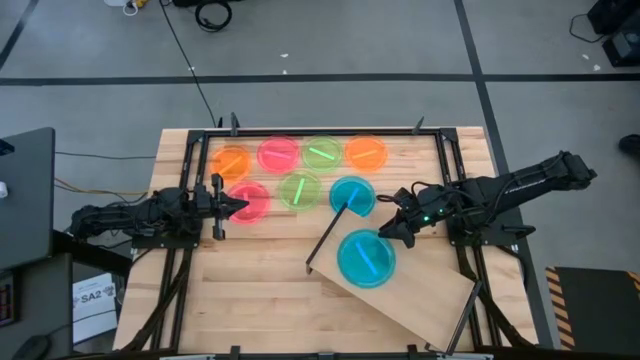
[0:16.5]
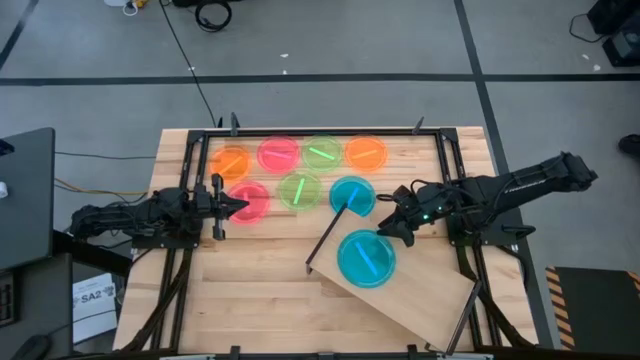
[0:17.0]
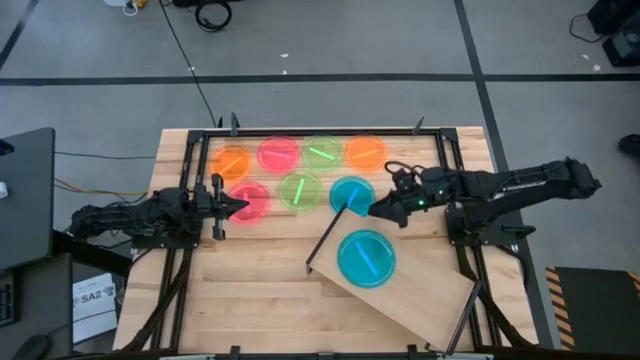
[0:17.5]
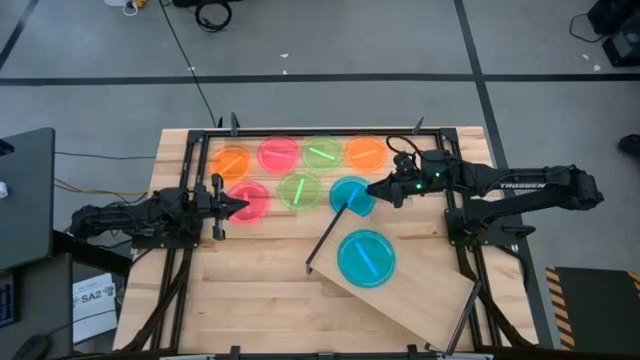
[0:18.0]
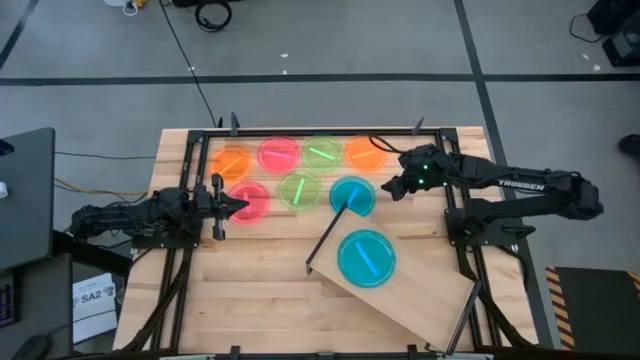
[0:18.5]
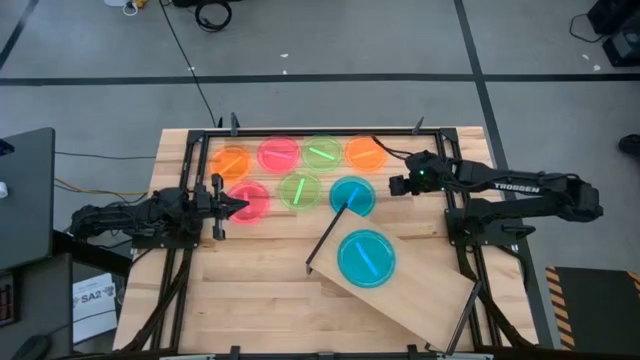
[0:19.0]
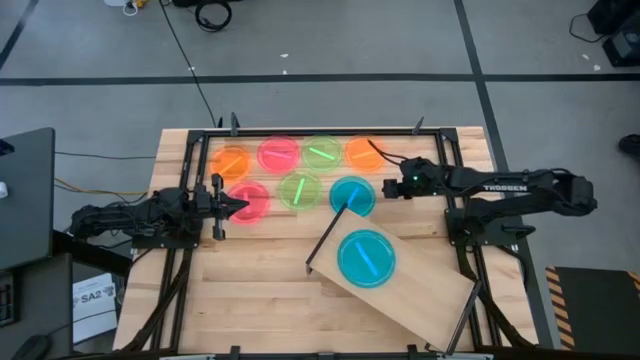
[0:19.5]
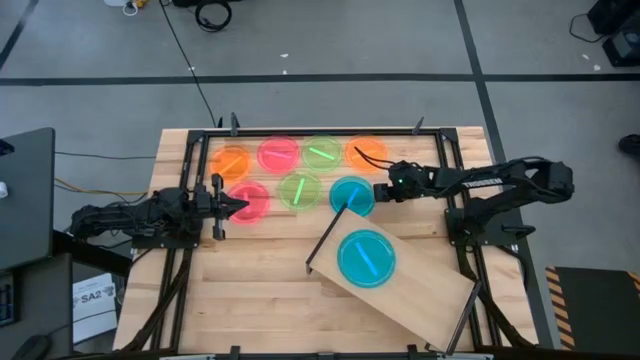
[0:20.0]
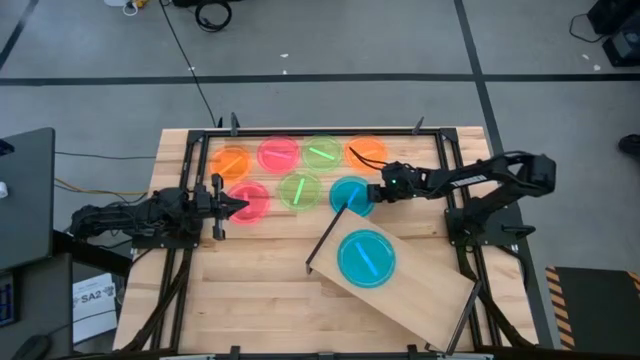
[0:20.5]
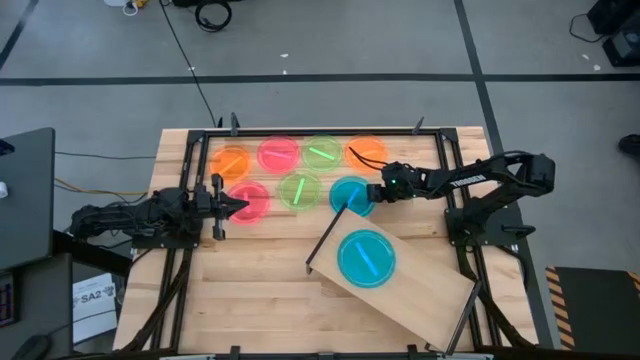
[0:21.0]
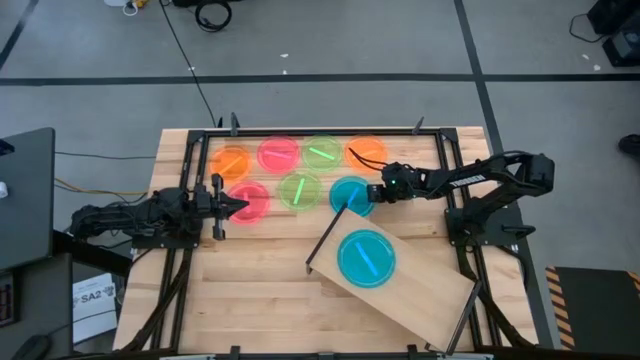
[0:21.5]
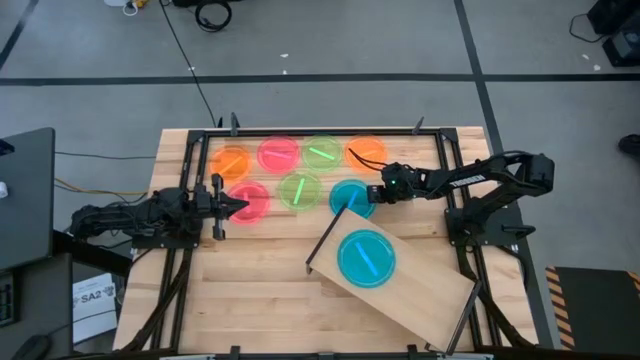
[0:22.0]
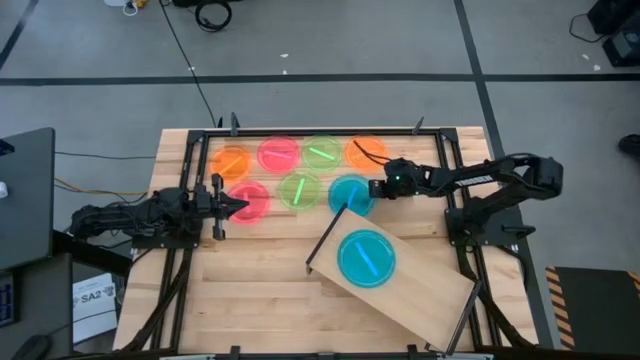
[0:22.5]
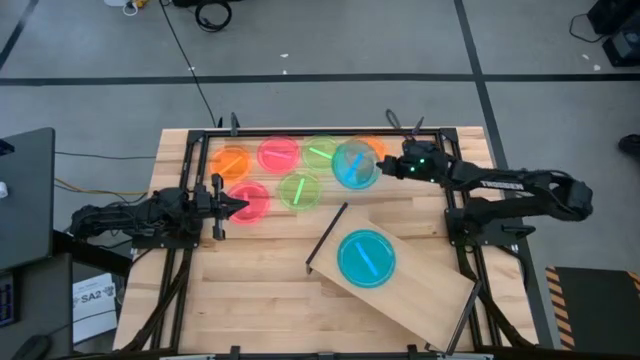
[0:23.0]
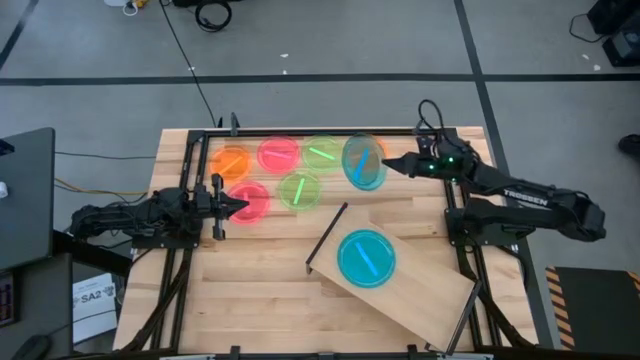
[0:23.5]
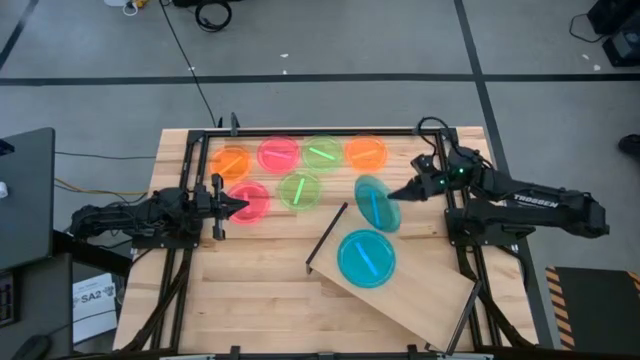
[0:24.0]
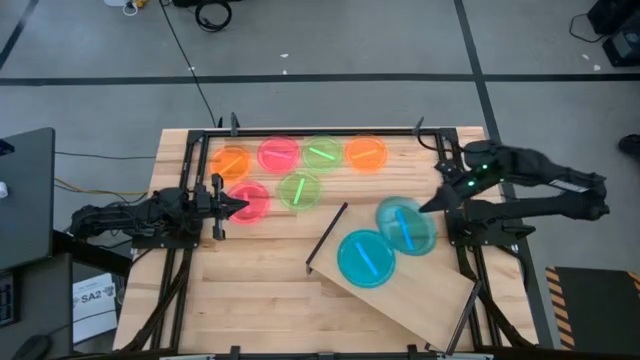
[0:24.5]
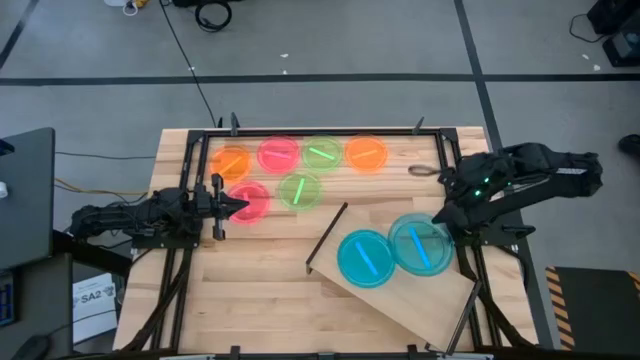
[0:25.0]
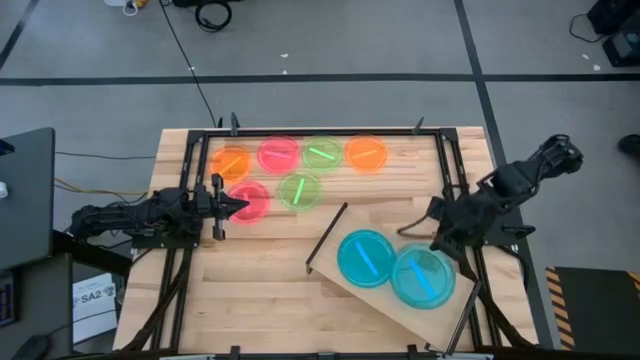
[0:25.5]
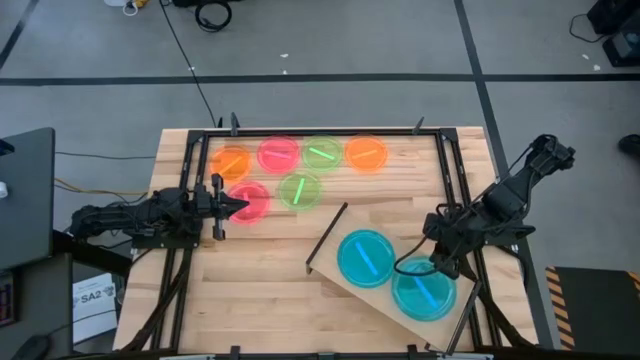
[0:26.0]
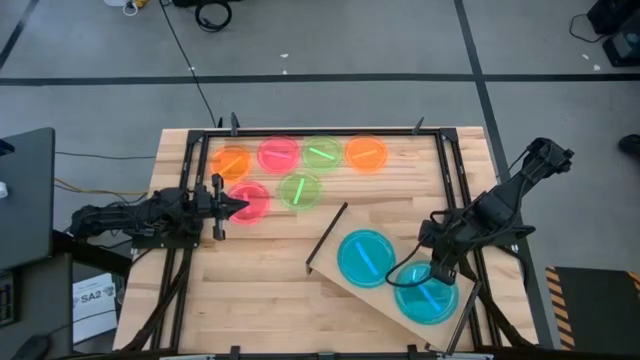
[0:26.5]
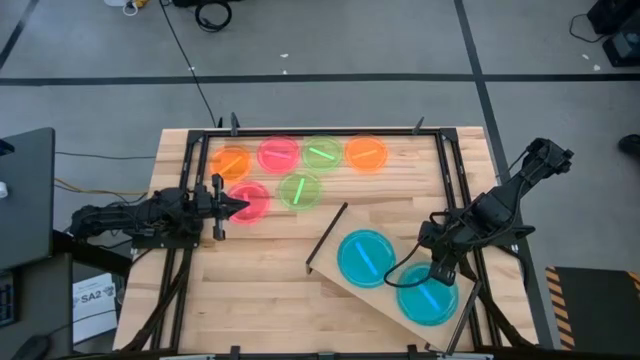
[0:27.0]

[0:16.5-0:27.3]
Task: Place and stack plates onto a shelf
Put the transparent blue plate on the shelf

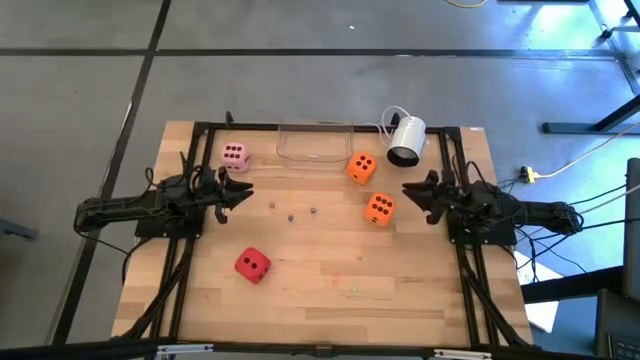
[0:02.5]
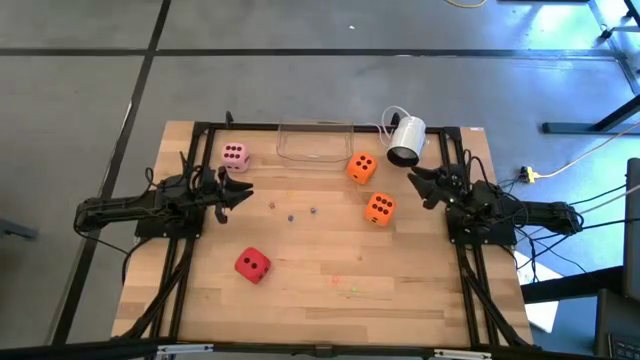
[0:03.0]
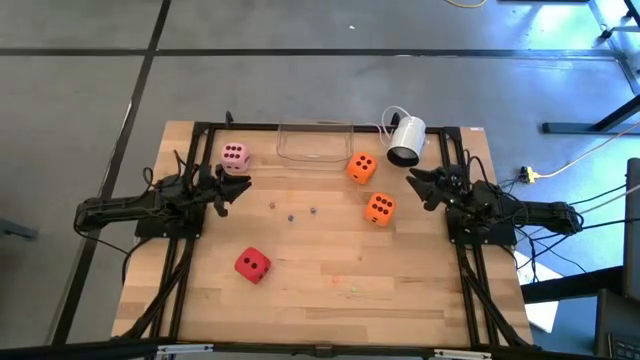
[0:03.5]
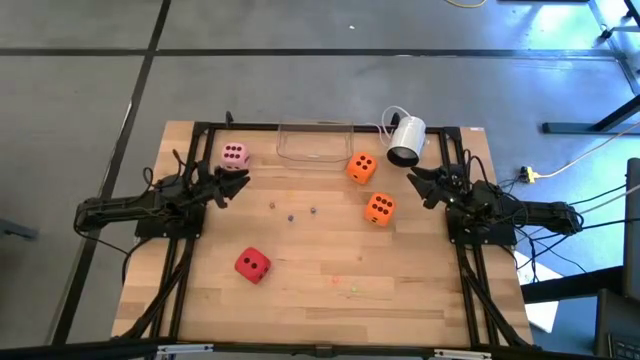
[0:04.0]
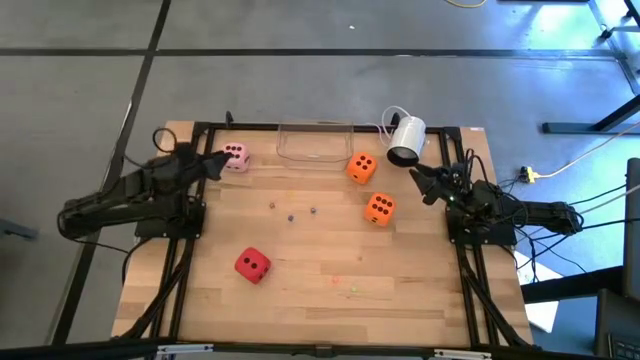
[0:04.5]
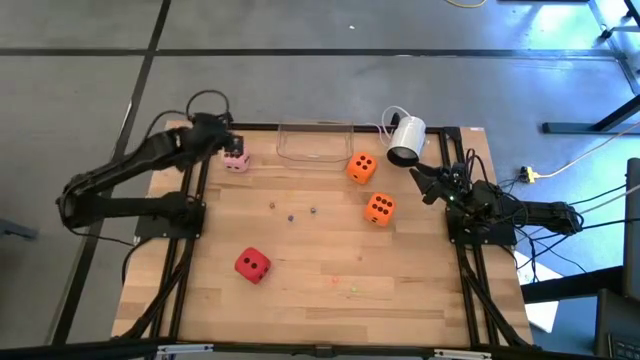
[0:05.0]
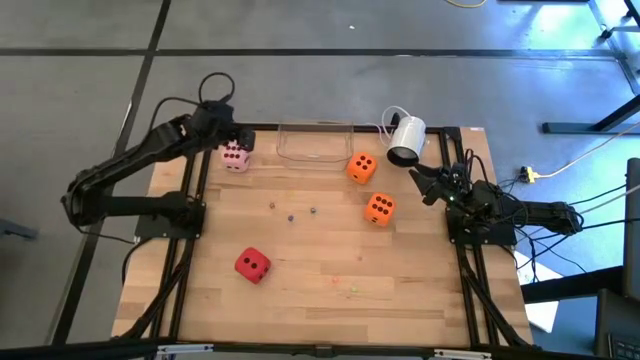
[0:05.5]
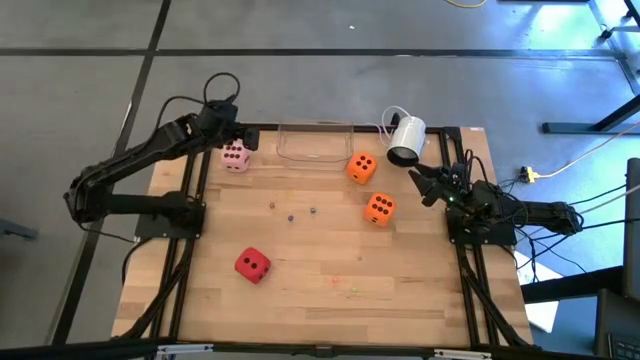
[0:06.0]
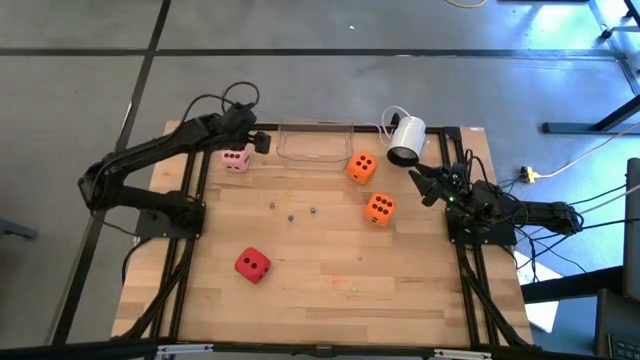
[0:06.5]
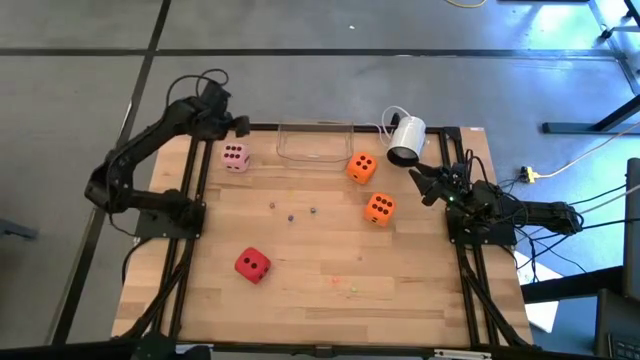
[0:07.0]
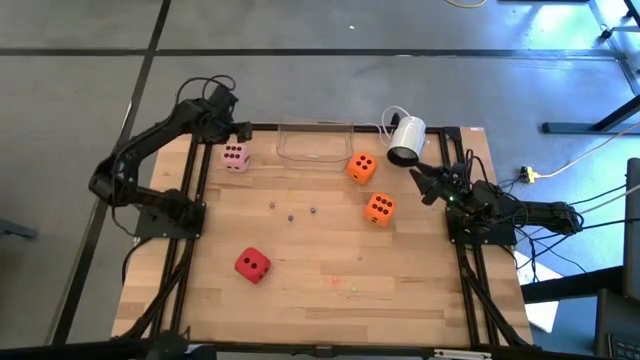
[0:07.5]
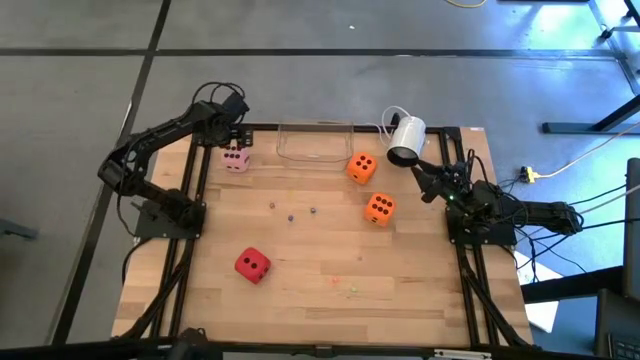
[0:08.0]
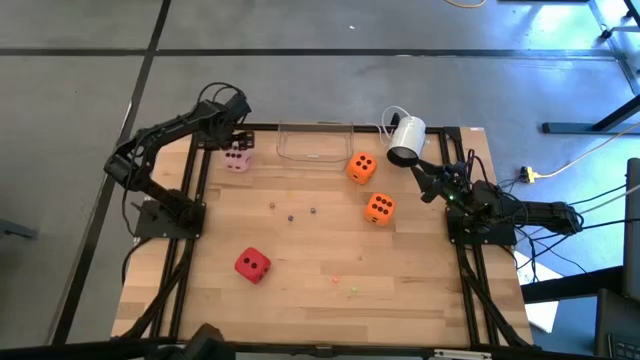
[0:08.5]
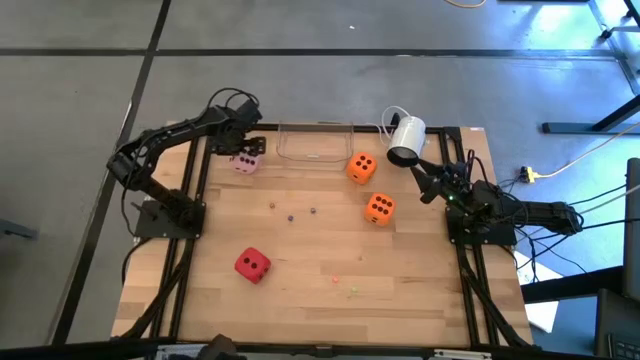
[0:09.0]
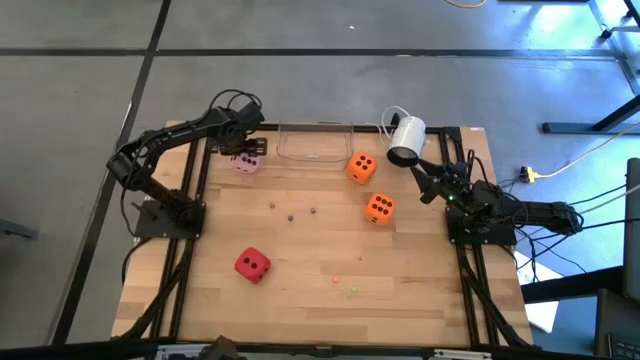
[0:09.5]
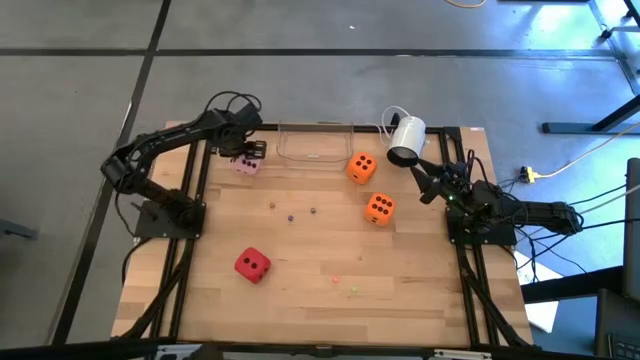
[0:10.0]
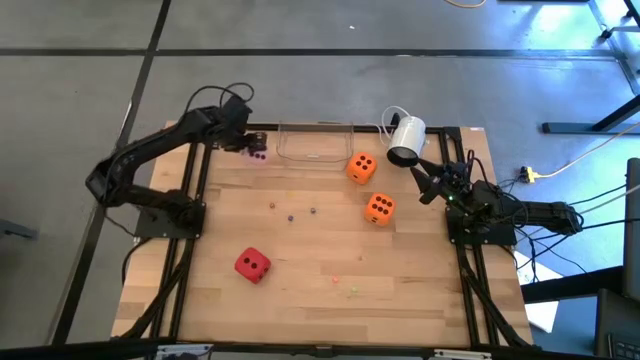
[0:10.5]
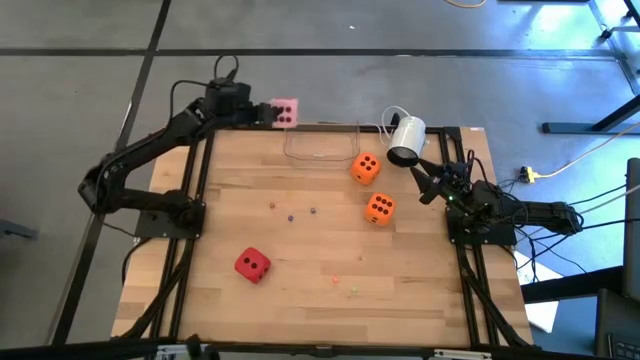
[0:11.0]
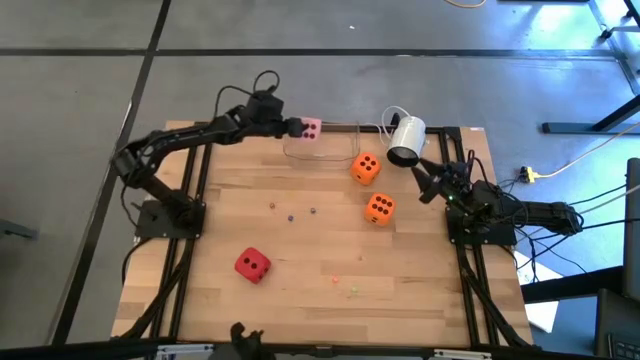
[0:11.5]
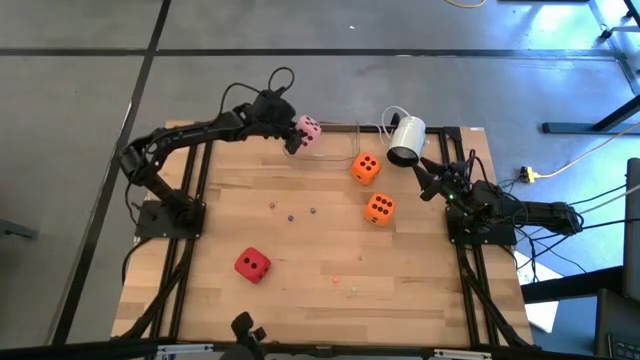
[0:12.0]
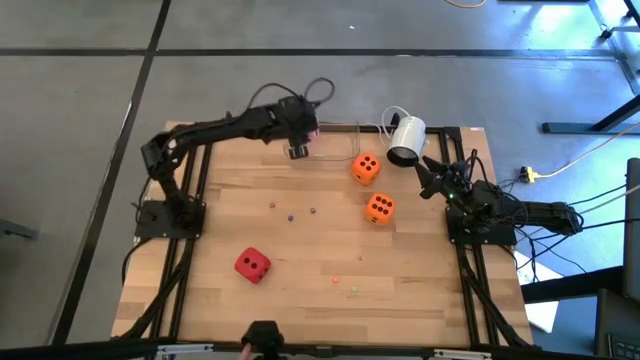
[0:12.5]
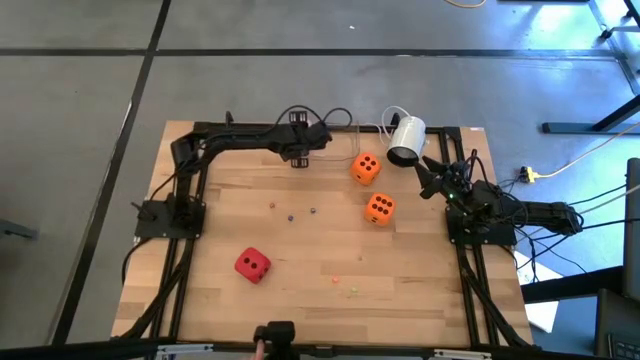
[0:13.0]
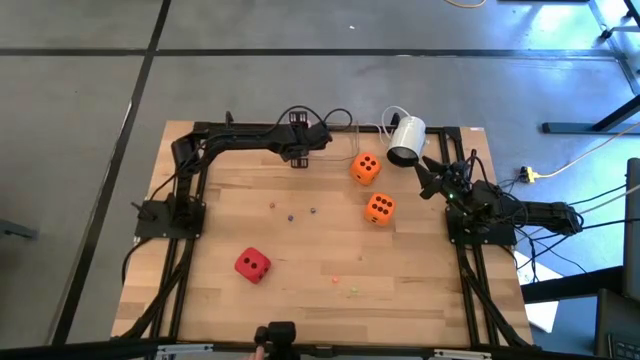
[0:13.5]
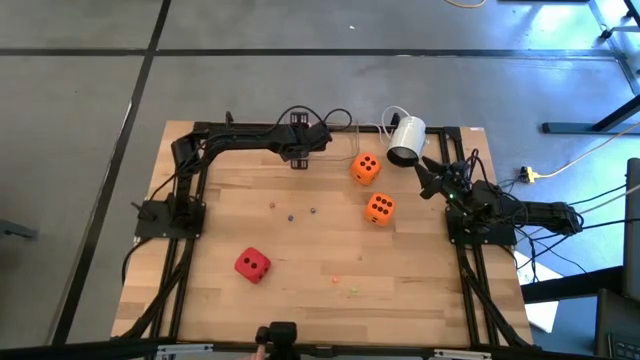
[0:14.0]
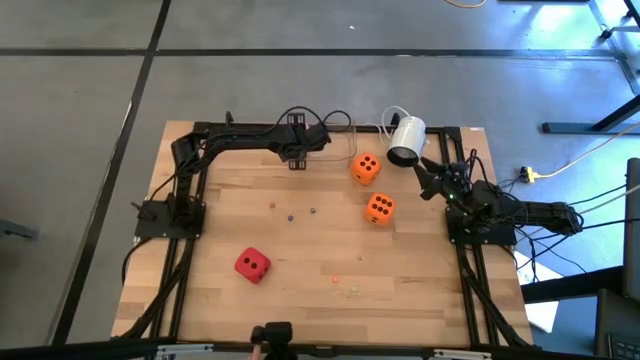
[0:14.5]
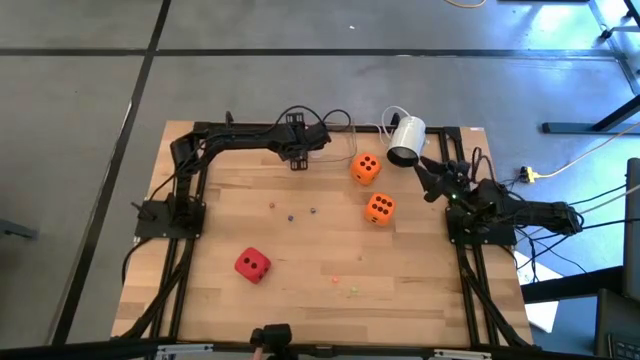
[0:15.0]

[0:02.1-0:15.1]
Task: Pick & Place Dice
Put the large pink dice into the transparent bin
